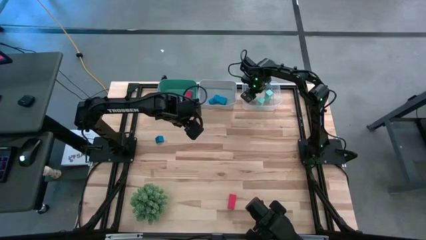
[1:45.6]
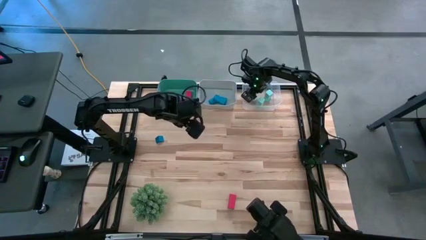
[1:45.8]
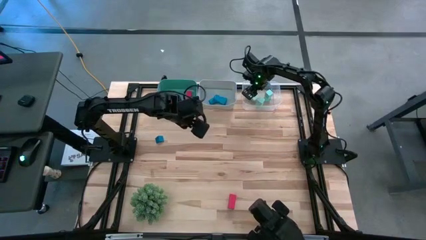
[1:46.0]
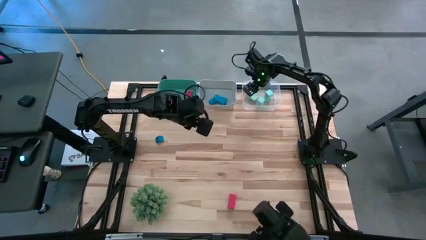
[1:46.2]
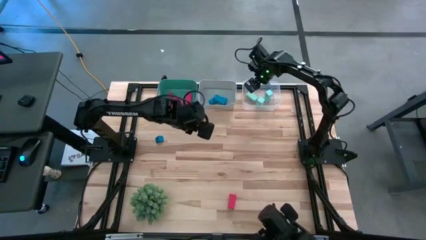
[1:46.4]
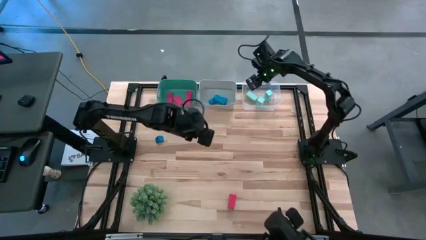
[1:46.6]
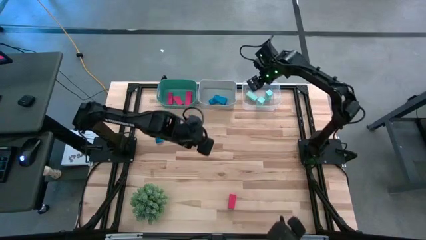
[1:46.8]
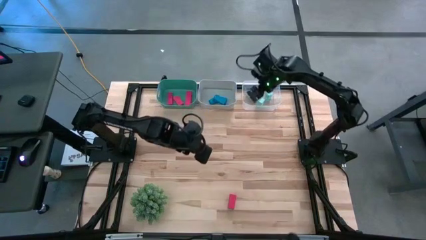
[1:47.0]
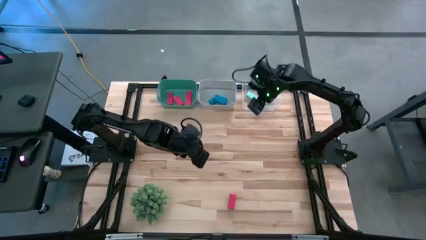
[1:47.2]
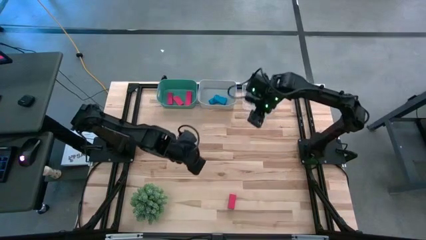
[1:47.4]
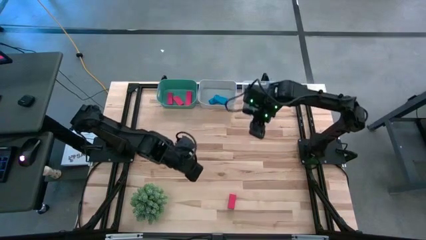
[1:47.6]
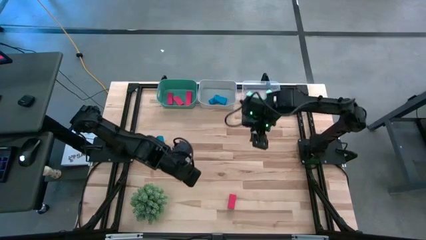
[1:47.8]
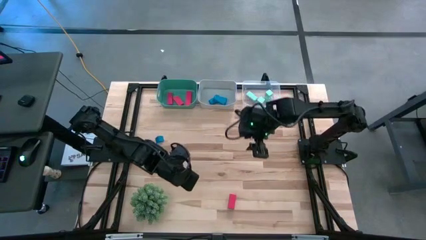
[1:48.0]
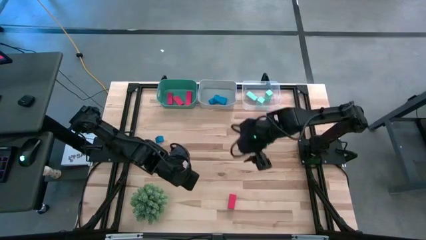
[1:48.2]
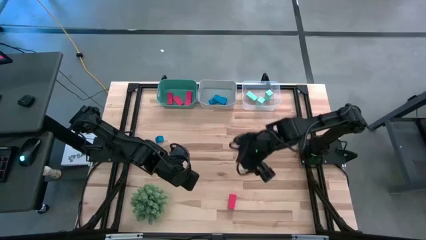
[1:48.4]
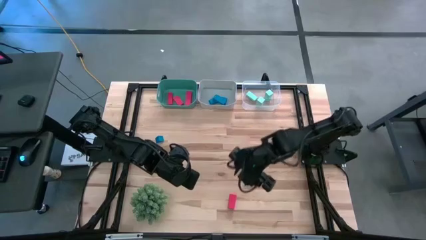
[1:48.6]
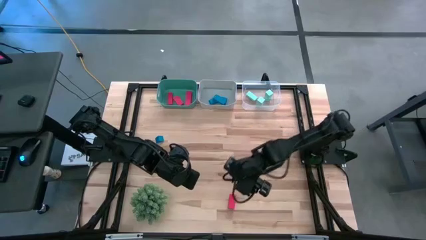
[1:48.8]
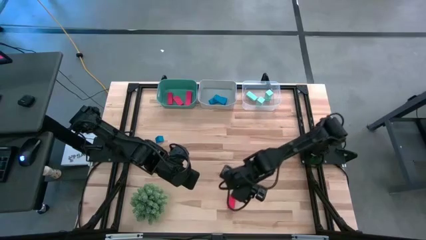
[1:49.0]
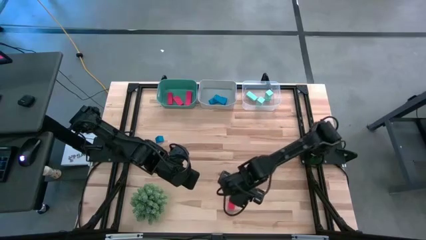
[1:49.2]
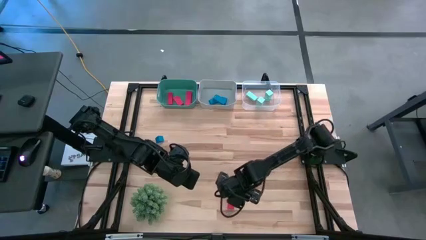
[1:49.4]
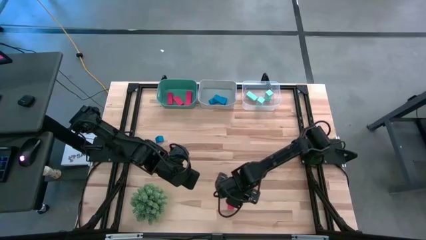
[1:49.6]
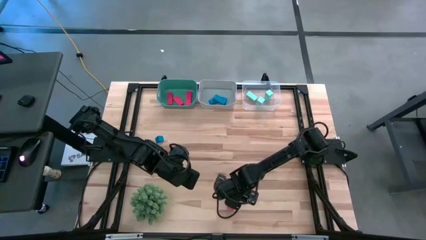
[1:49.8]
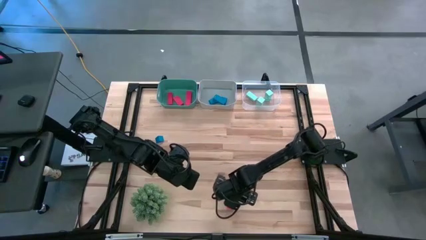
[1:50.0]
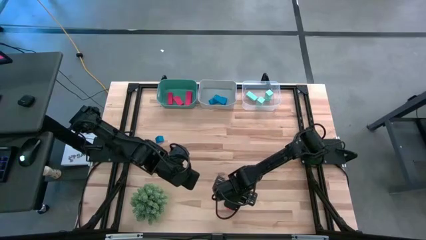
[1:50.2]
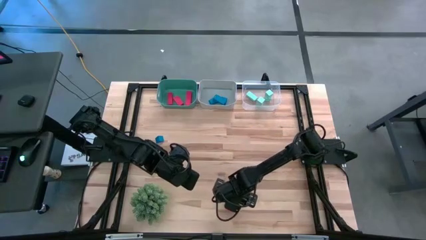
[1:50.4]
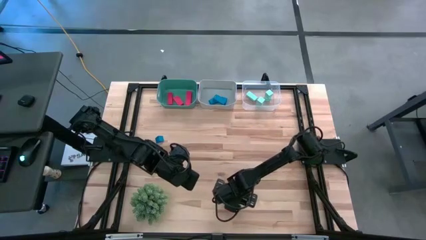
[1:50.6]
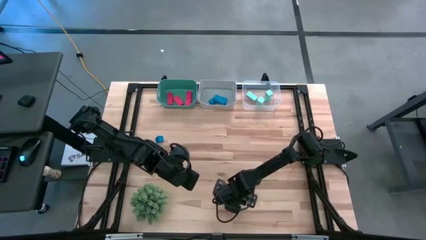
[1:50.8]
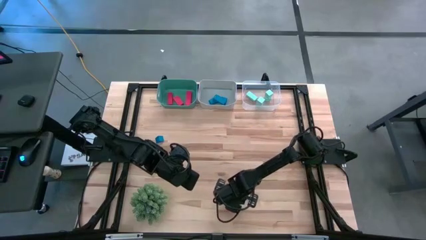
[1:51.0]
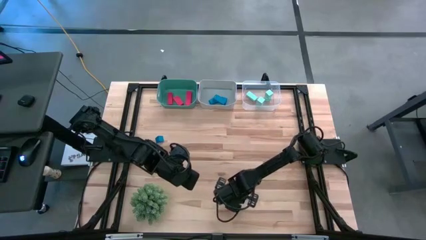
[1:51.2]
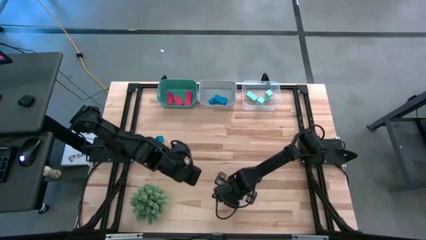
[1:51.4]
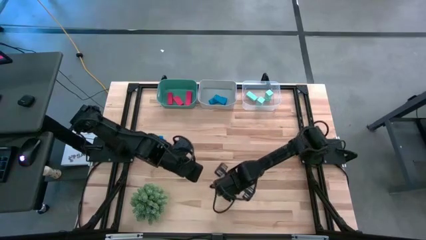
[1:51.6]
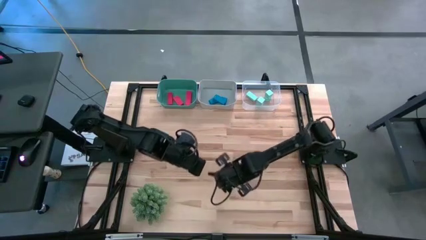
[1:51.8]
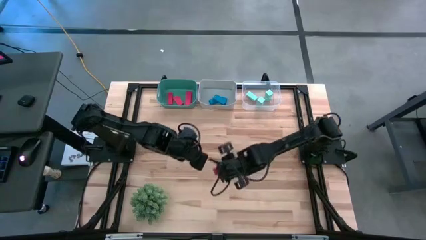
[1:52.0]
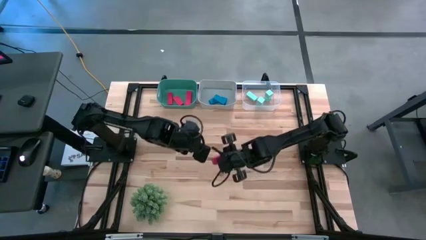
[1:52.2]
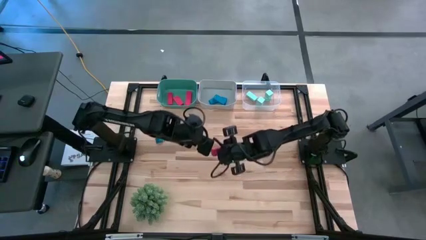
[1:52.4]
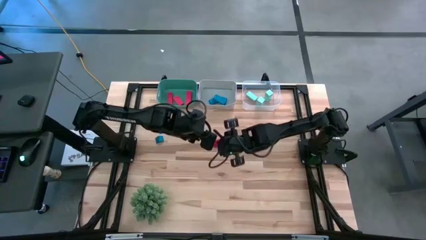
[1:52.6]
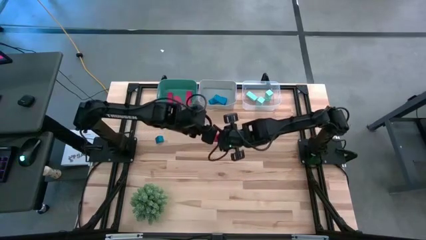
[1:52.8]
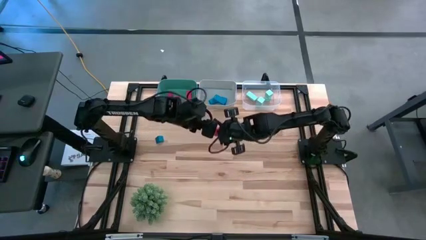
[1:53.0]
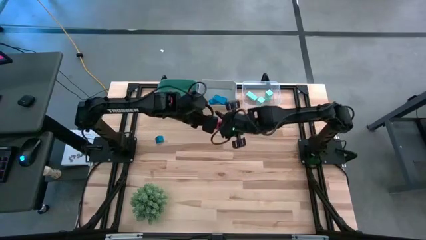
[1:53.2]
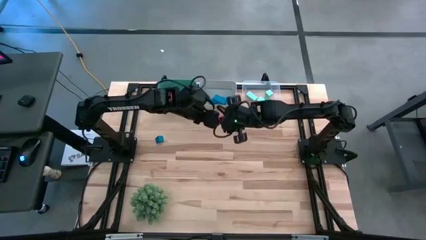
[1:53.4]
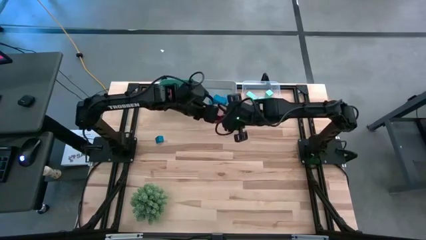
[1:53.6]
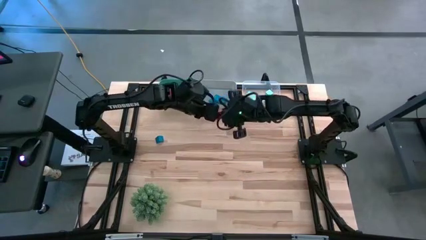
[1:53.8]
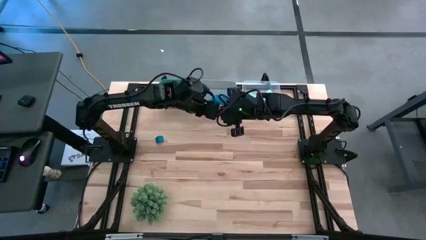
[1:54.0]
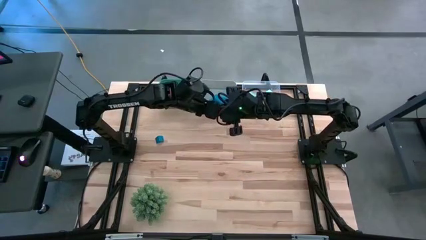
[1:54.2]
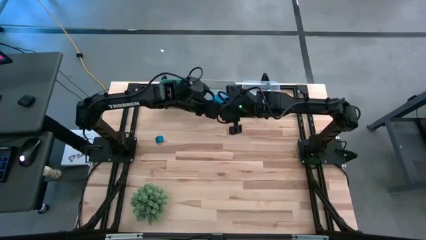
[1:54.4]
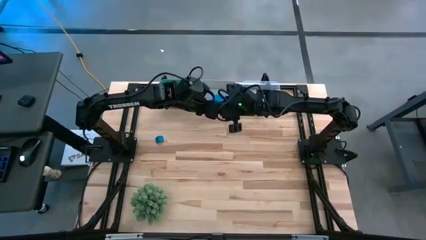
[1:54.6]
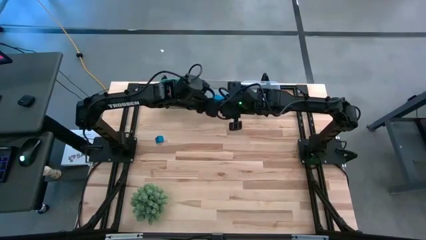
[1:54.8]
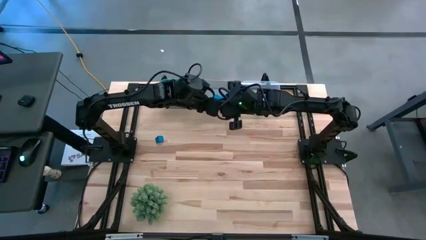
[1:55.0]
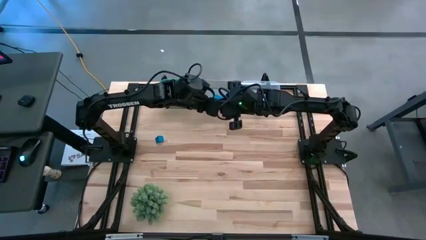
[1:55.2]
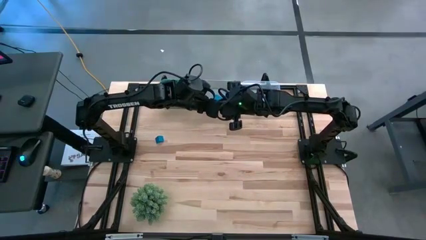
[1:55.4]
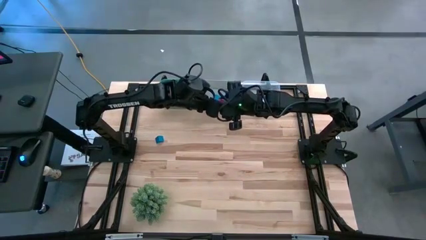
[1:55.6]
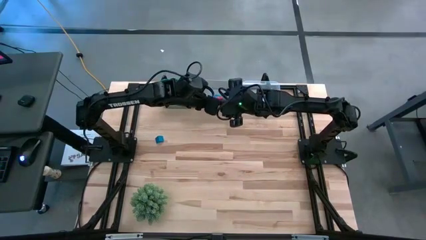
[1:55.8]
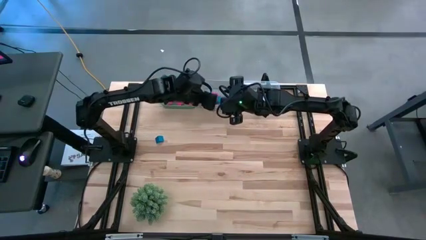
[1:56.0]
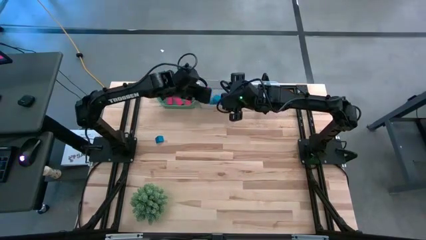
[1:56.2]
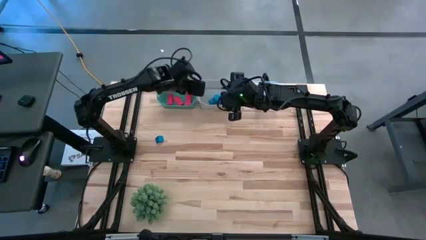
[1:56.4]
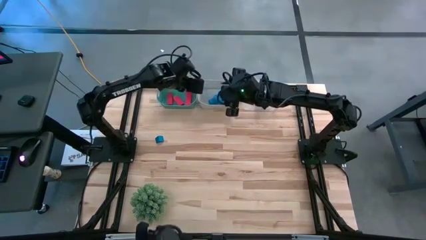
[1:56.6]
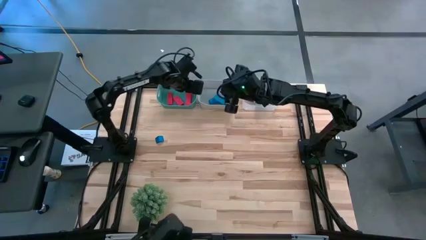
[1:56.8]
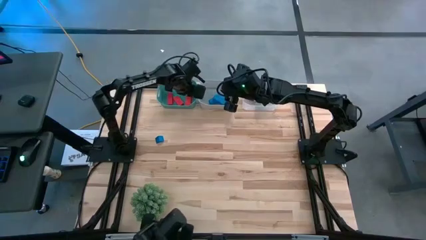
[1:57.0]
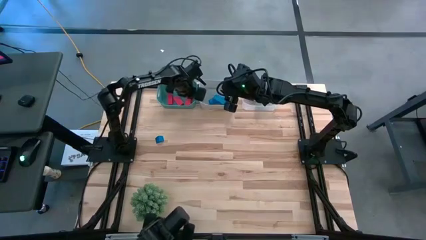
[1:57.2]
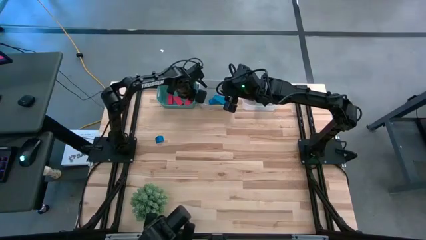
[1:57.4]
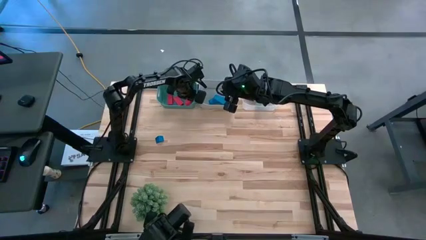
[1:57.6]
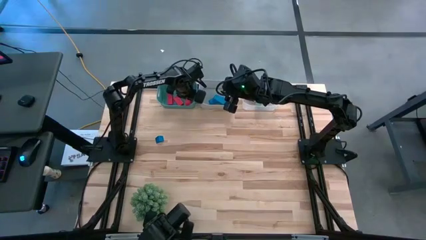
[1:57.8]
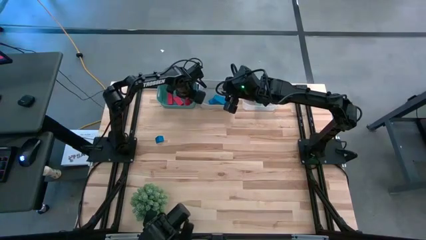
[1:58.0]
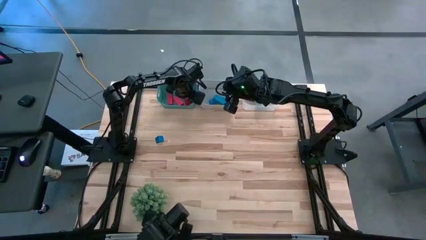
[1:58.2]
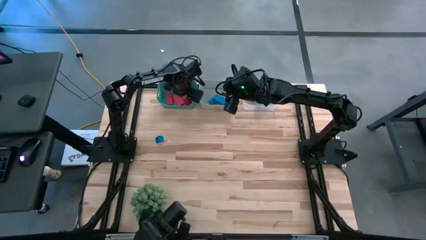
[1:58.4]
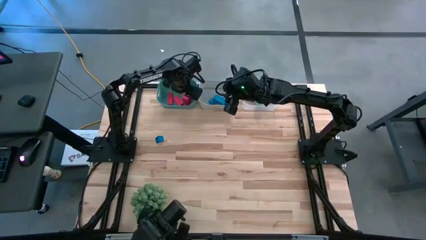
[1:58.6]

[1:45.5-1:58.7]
Task: Sort & place blocks by color
Put the red block into the green bin

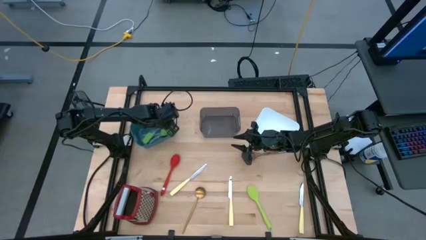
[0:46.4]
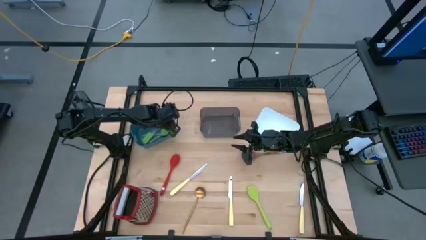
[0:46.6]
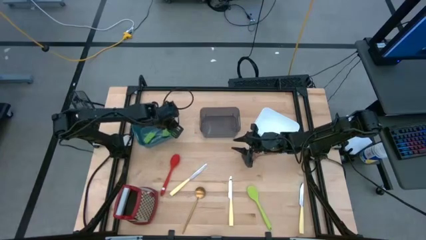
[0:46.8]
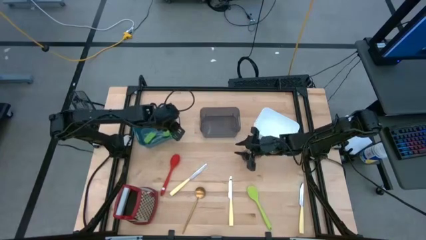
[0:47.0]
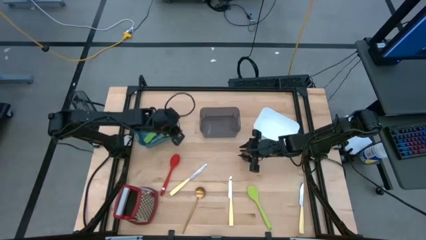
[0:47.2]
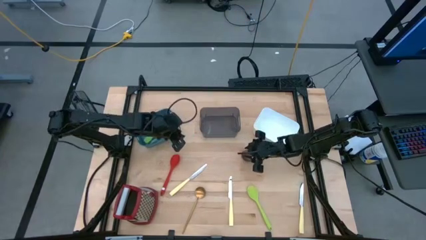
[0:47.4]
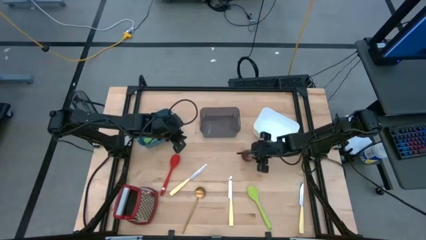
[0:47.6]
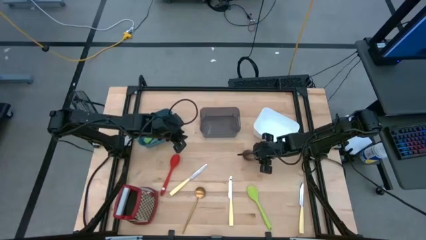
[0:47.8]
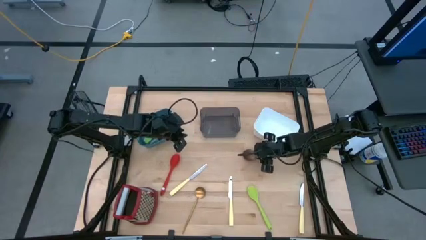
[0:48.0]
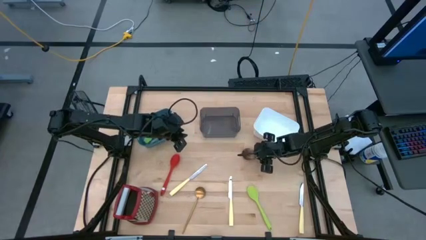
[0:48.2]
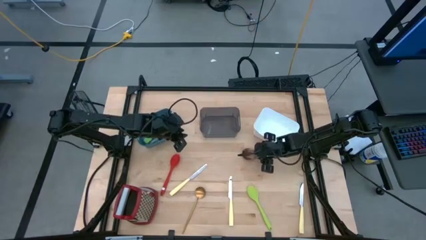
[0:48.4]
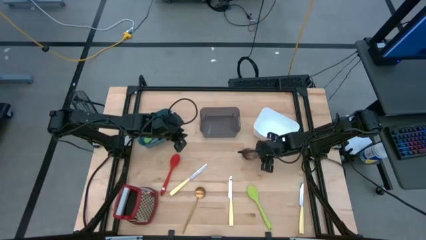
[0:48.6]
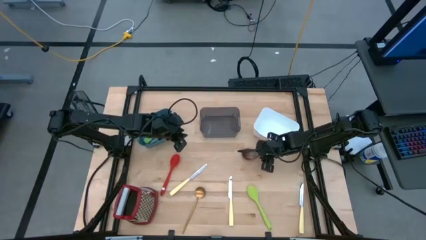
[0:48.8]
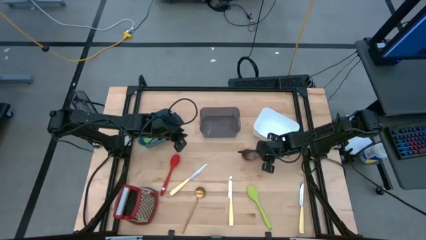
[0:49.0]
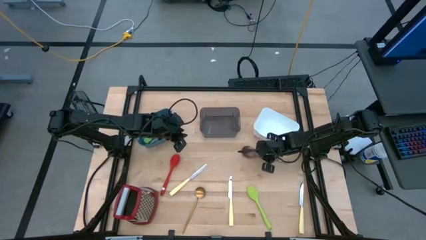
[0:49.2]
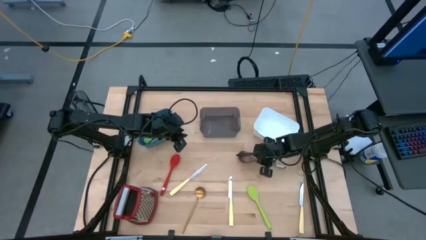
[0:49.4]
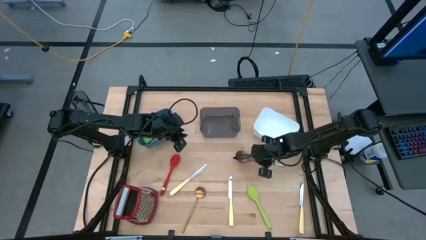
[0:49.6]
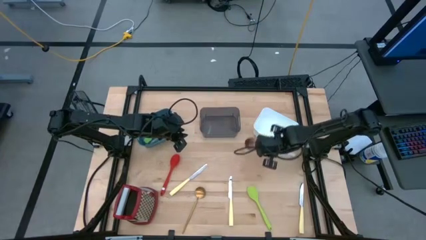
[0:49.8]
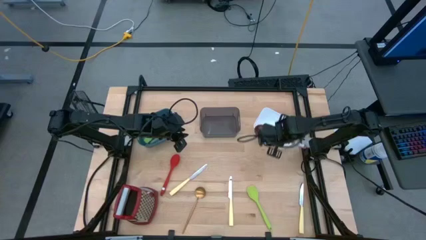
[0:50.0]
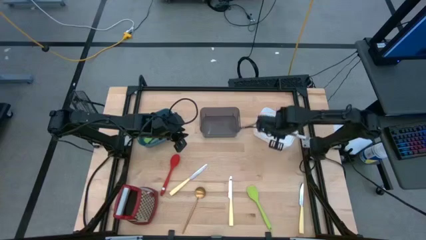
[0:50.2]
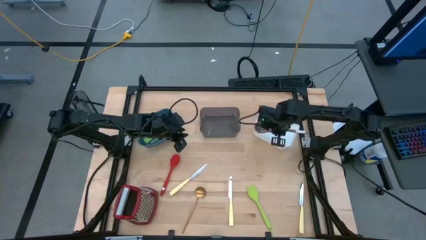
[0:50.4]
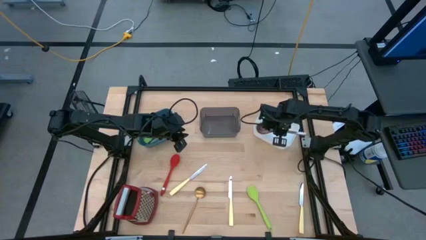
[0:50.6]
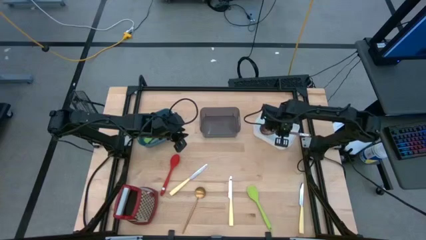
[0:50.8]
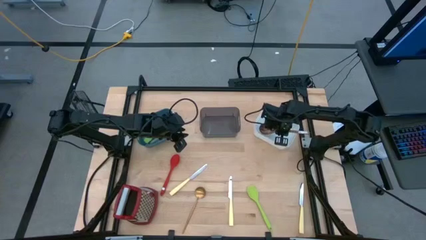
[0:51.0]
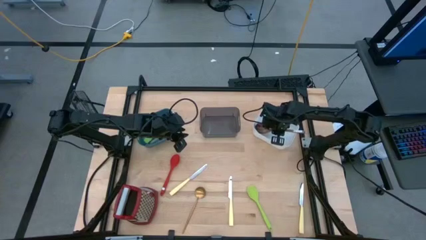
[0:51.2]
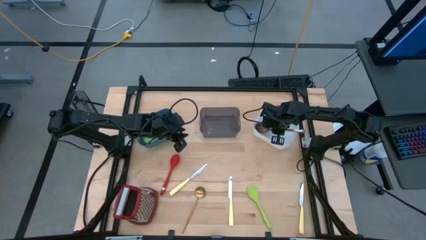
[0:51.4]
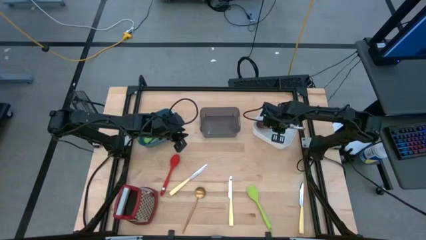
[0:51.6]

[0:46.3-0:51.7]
Task: Pick & Place Kitchen Items
Put the wooden serving spoon into the white bin
